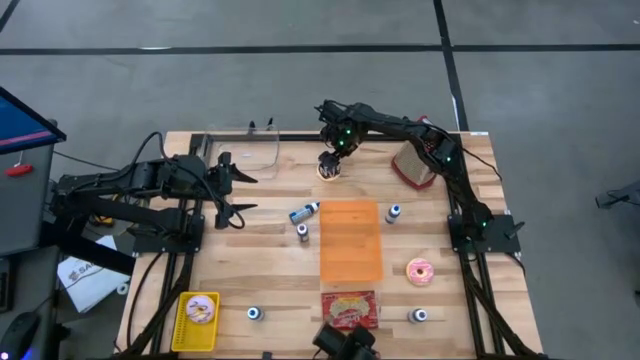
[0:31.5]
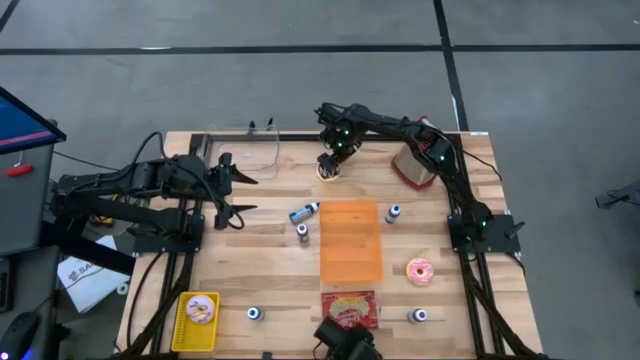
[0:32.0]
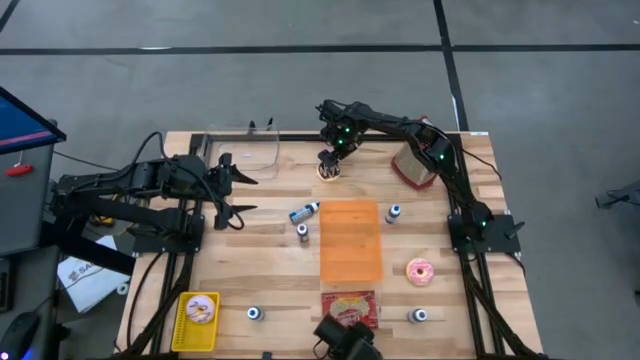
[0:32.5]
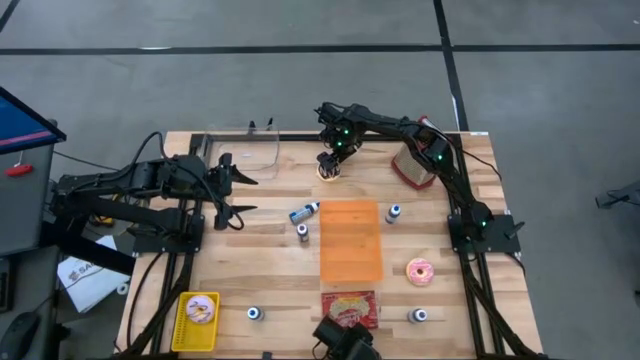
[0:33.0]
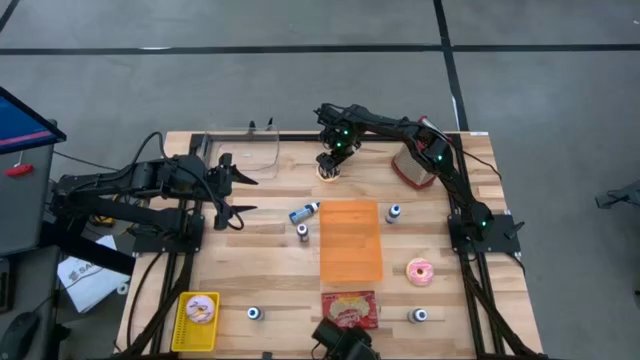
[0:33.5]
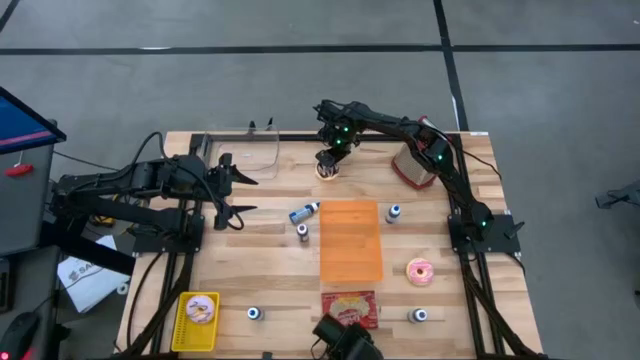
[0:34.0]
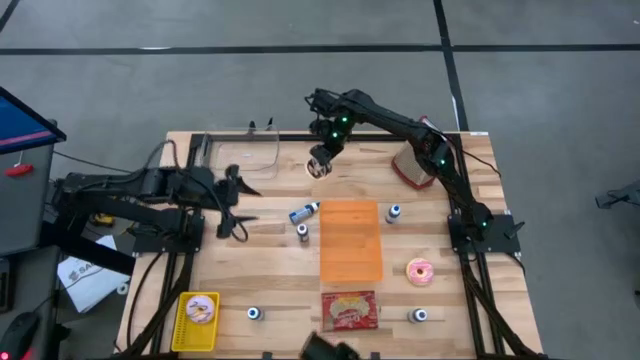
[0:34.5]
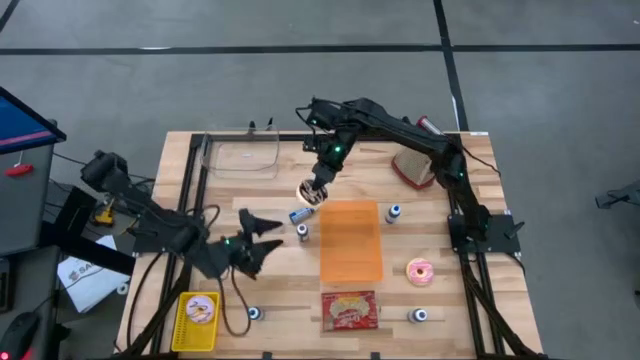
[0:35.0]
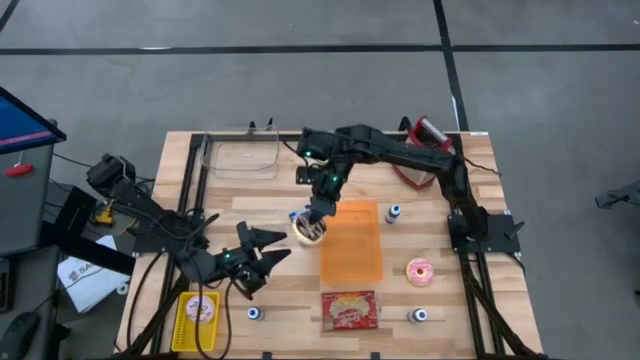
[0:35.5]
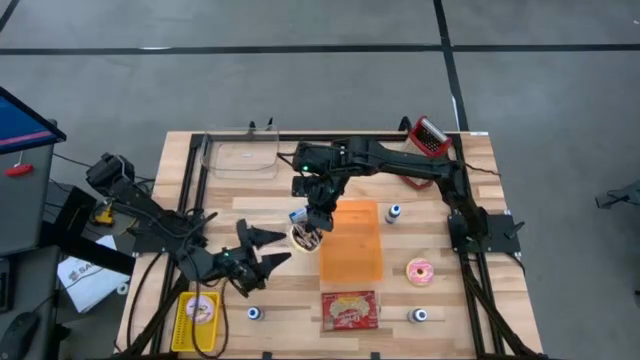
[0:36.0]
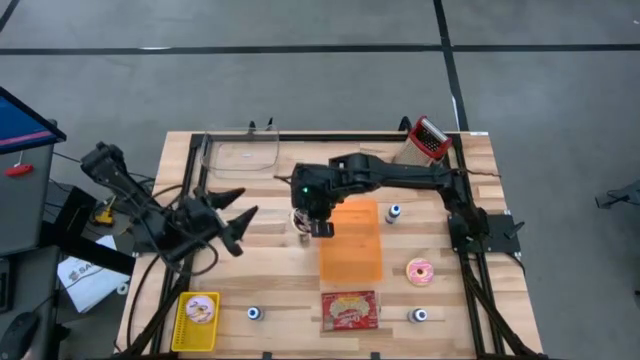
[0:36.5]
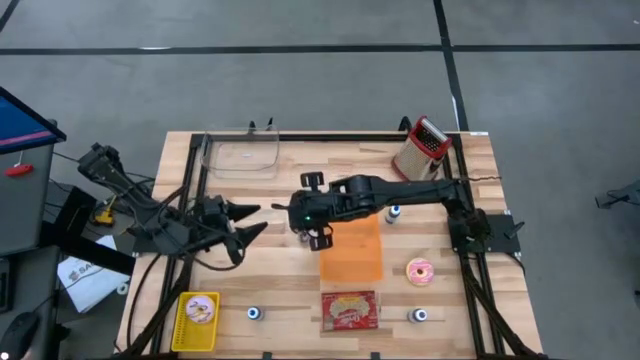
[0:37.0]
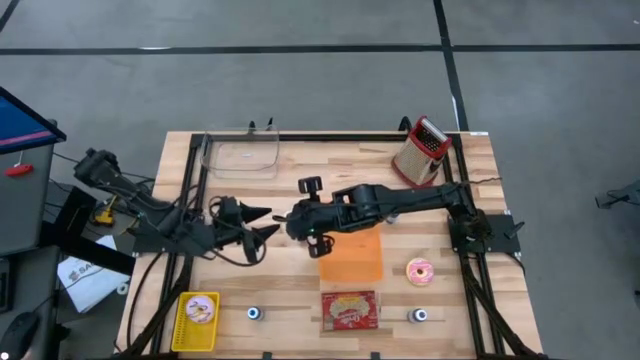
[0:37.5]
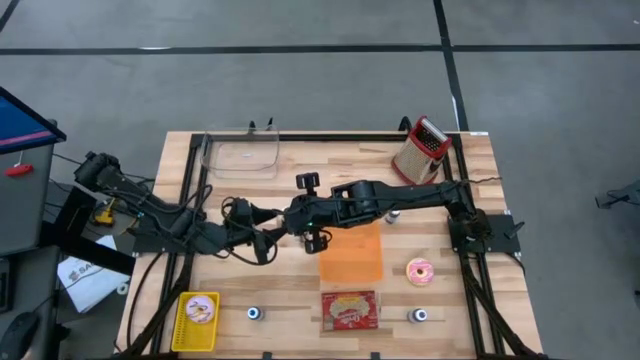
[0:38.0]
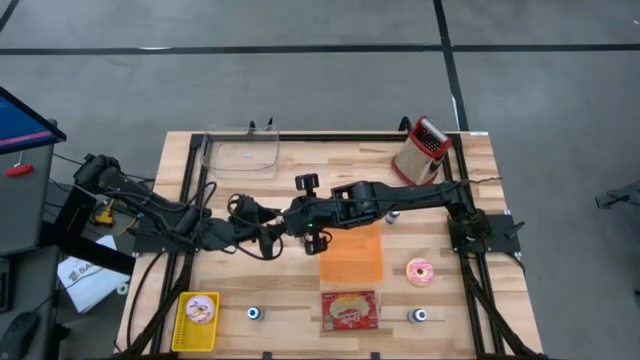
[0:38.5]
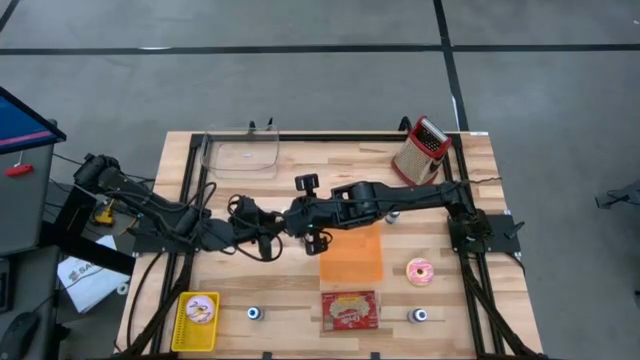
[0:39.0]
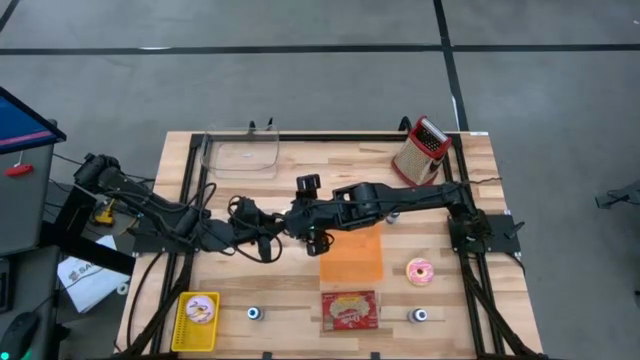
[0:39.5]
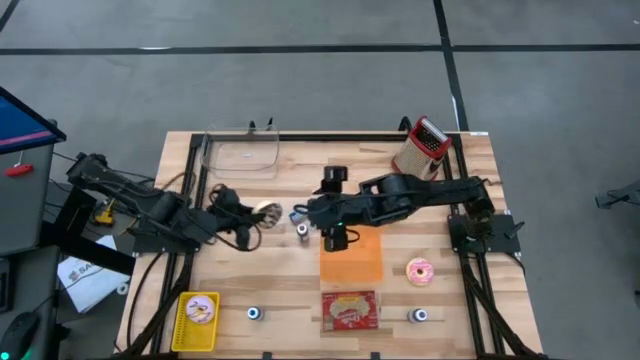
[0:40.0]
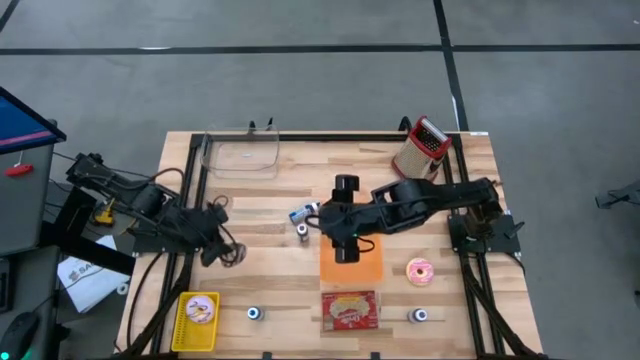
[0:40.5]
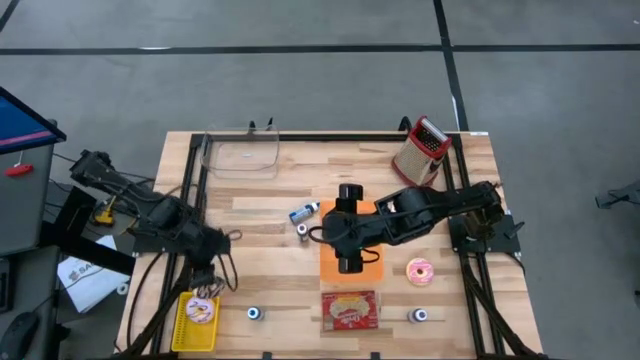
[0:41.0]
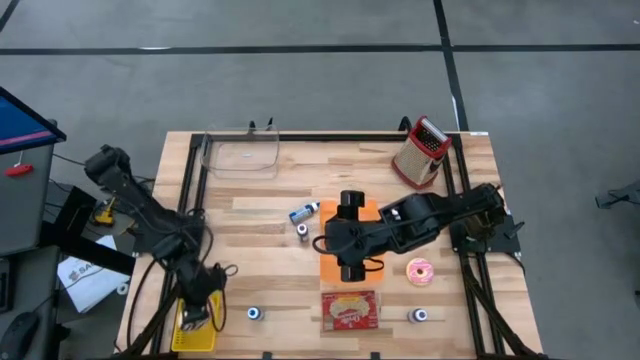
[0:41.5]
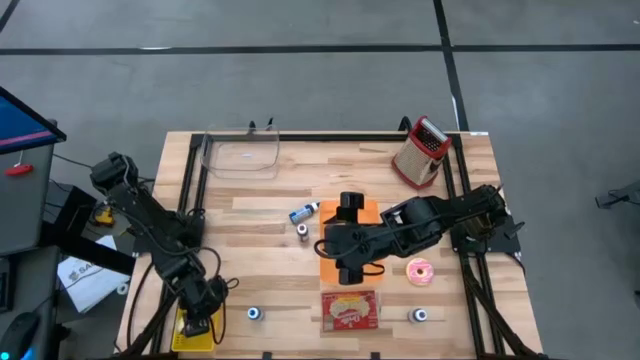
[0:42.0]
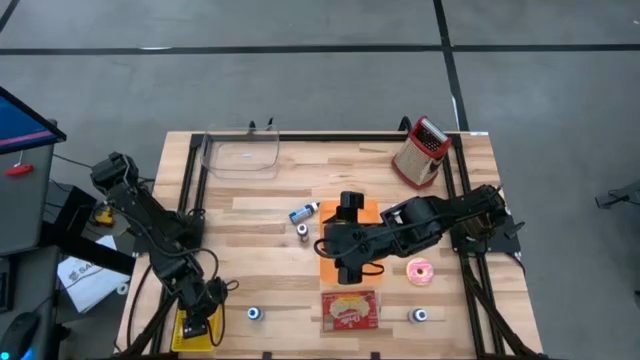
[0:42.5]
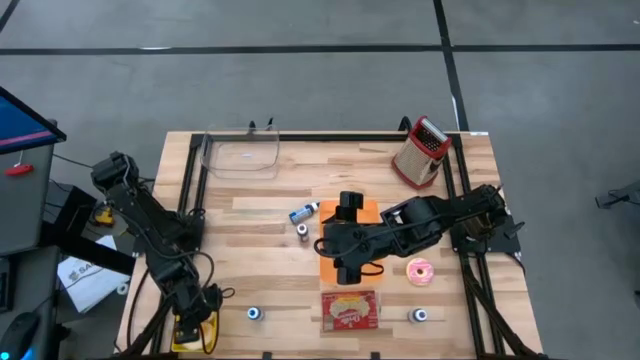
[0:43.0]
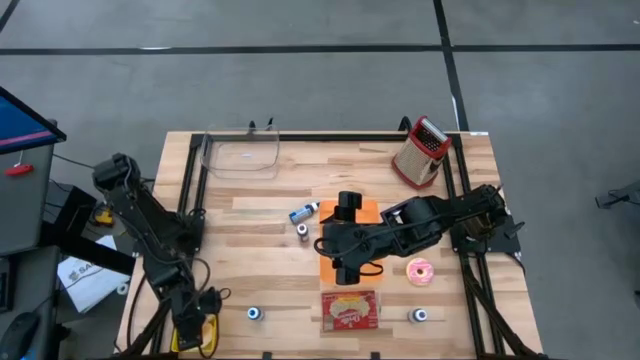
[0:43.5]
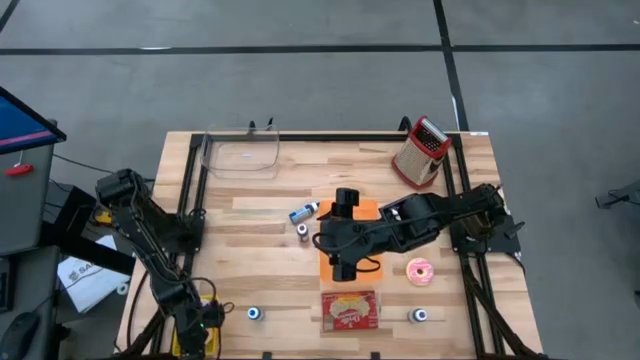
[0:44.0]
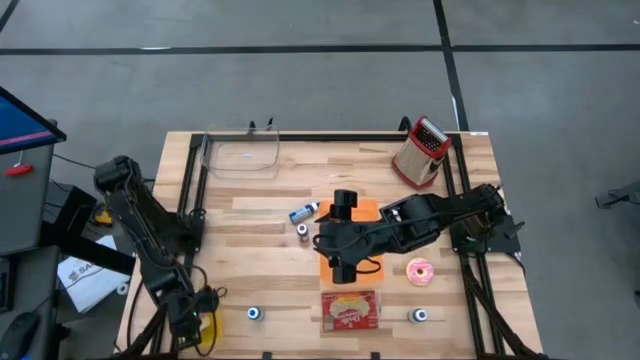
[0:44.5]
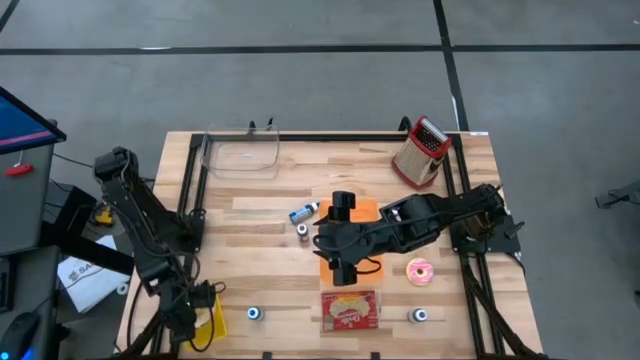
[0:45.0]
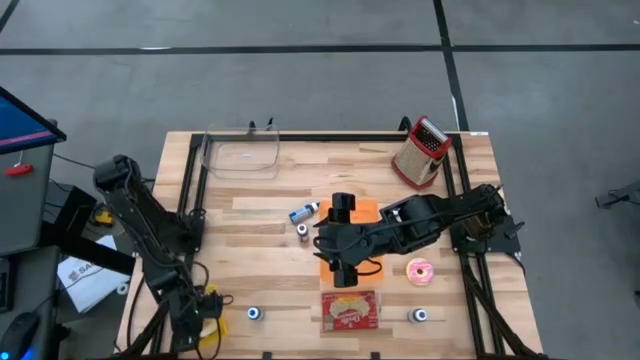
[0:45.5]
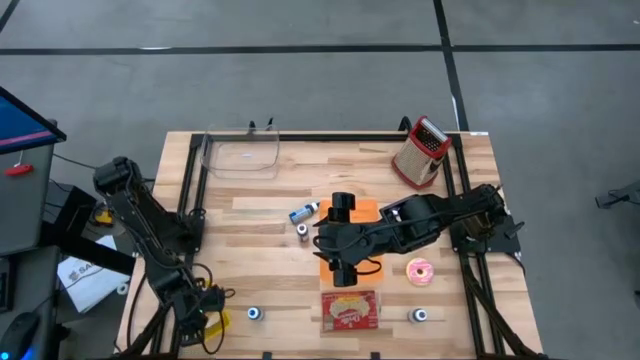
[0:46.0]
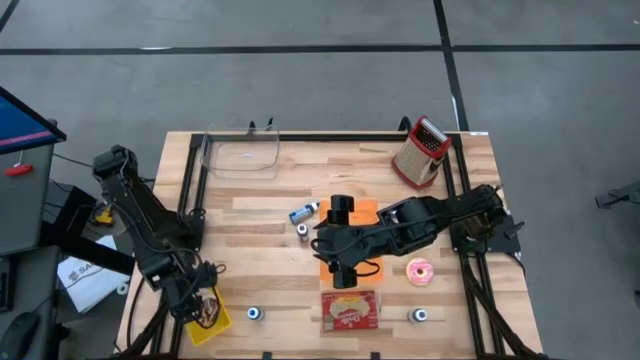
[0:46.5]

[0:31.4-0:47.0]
Task: Pick & Place Food Item
Put the black donut into the yellow basket

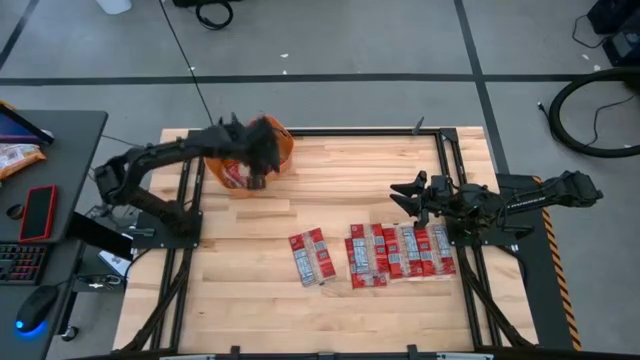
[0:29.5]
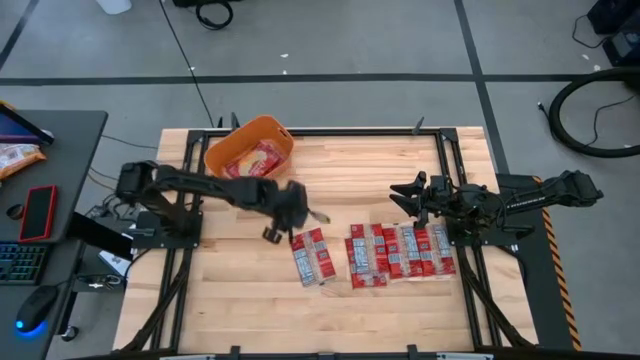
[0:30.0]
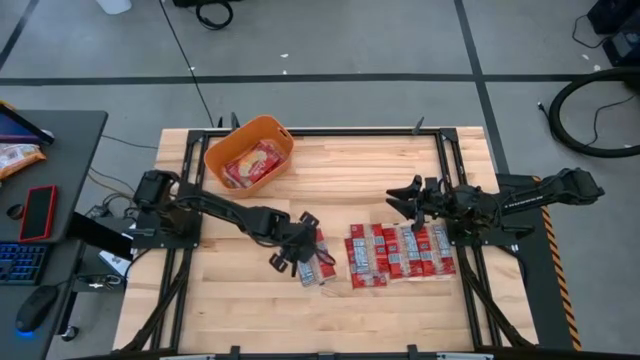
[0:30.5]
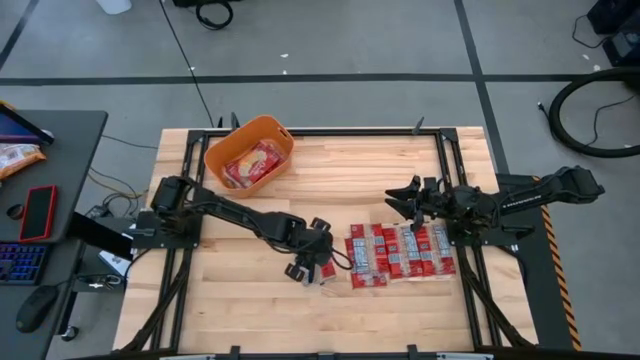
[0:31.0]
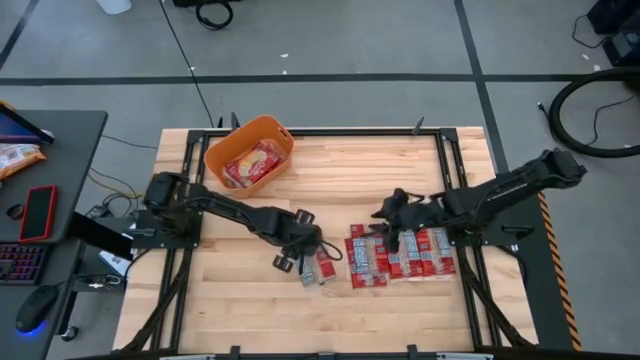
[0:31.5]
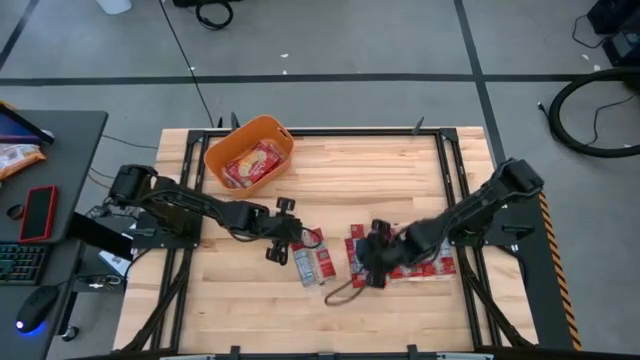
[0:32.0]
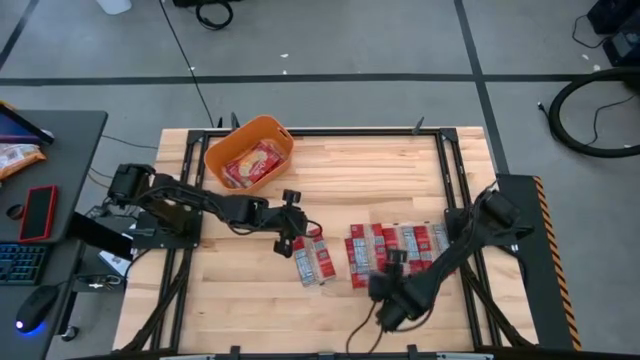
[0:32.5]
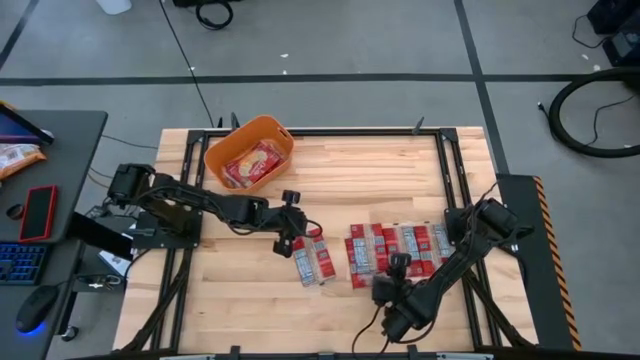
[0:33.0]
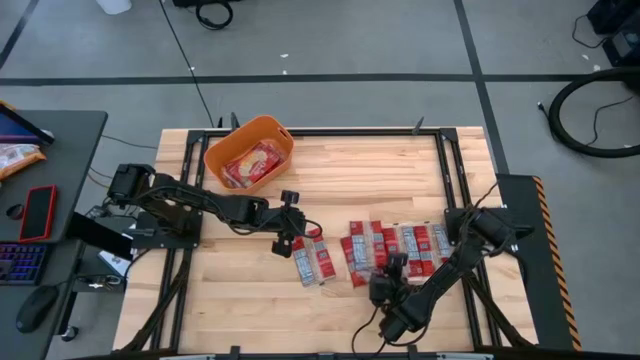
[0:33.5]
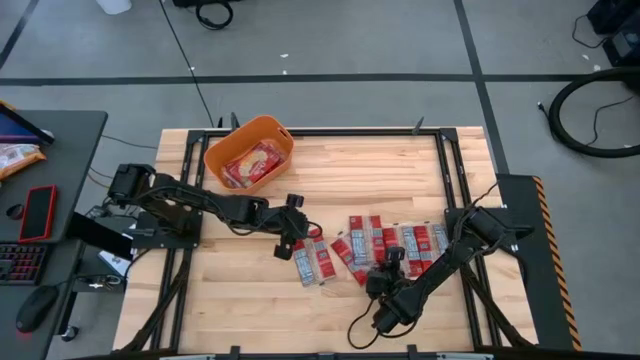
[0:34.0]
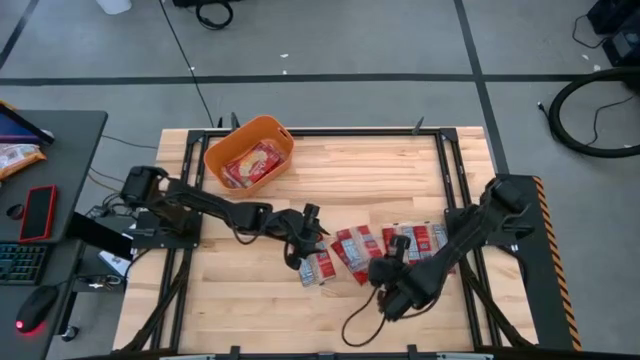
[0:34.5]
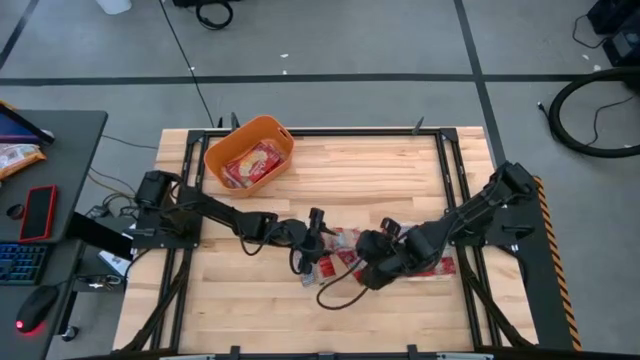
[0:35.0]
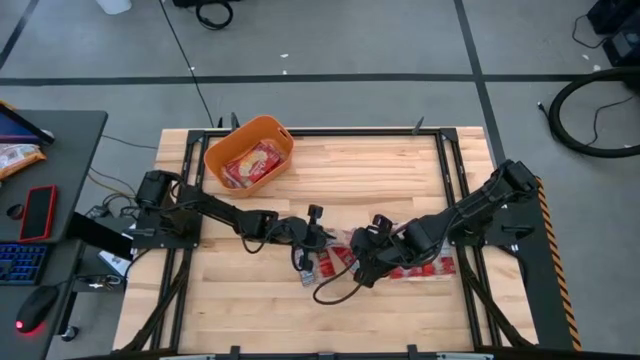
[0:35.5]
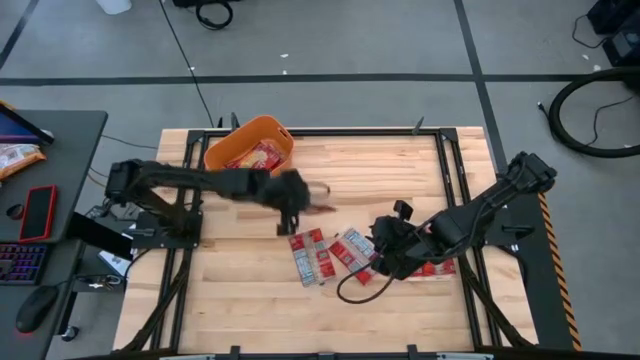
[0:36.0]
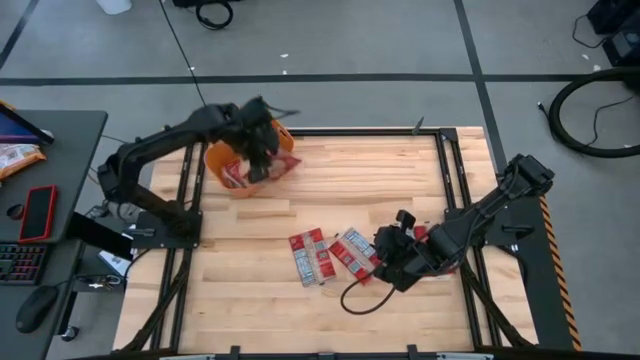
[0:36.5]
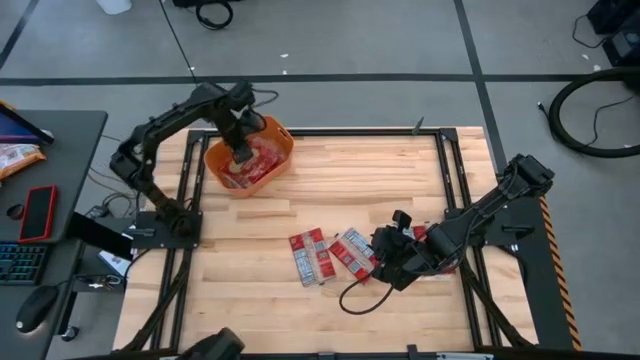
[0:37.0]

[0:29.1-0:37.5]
Task: Sort popcorn bags into baskets
Put the red popcorn bag into the orange container
